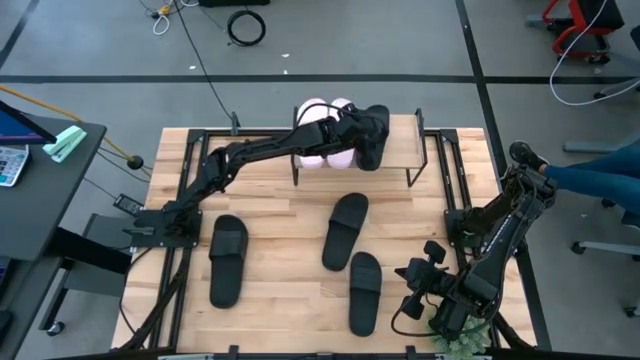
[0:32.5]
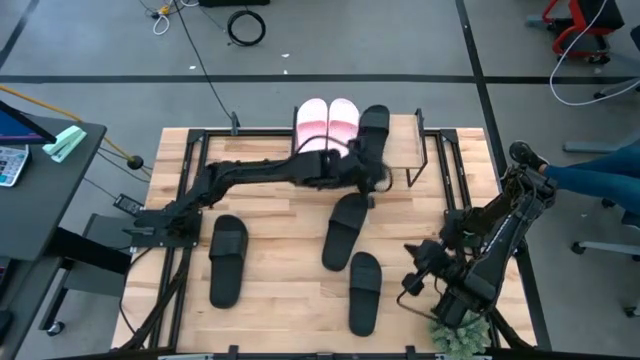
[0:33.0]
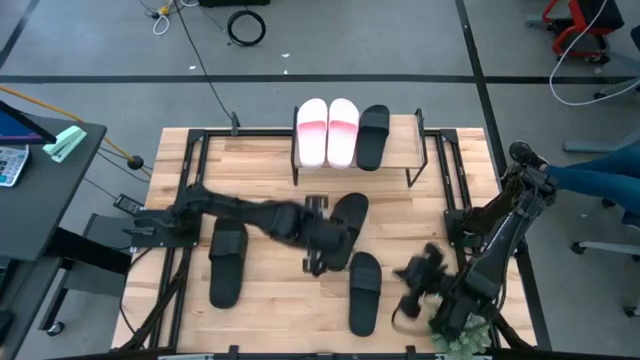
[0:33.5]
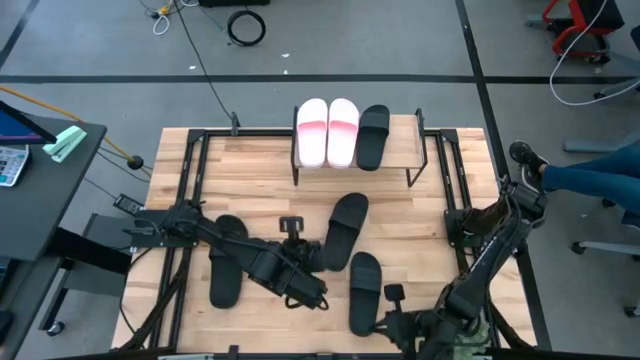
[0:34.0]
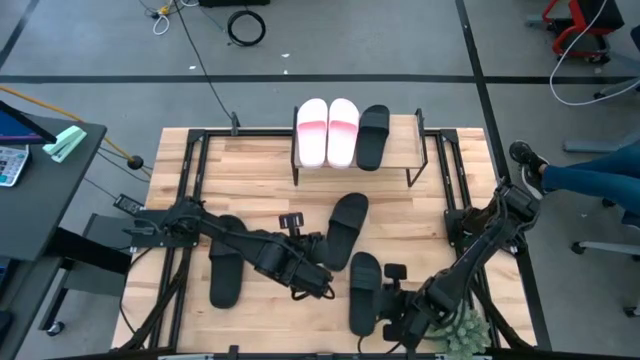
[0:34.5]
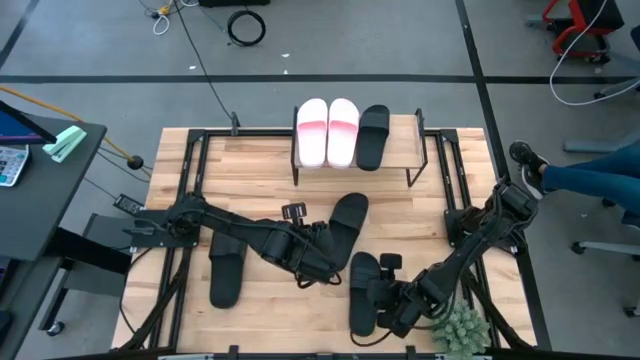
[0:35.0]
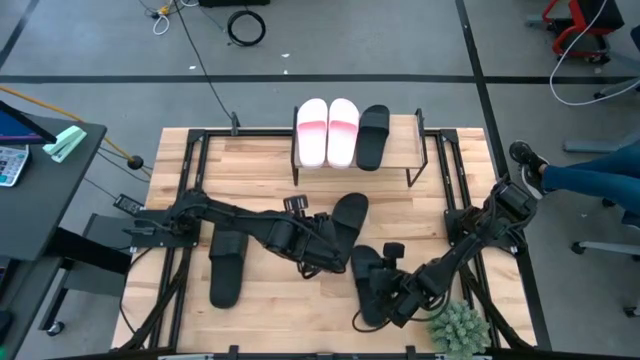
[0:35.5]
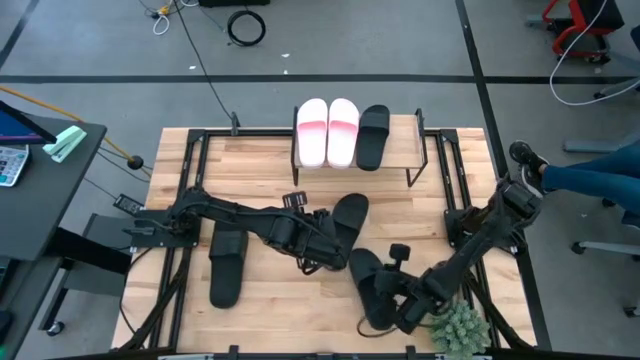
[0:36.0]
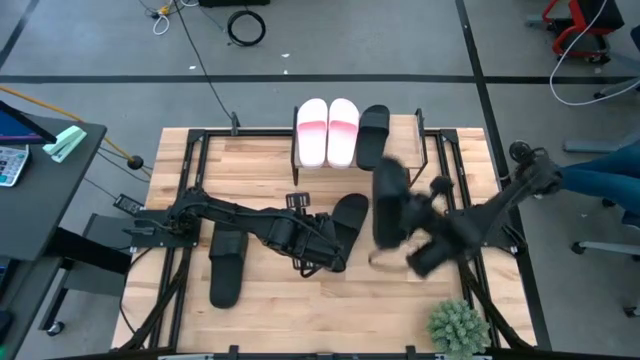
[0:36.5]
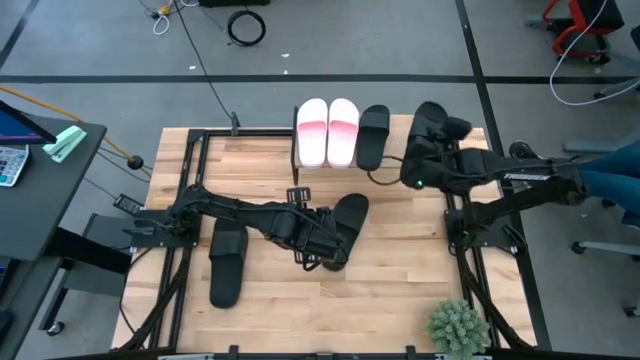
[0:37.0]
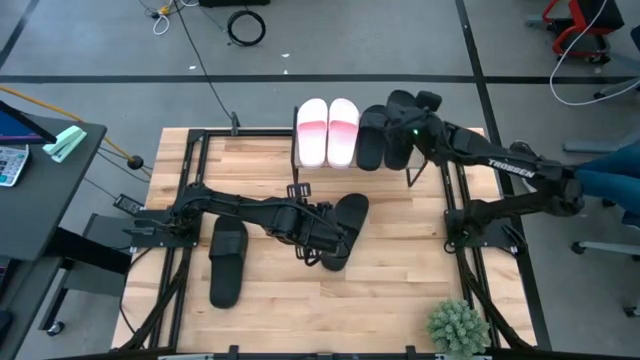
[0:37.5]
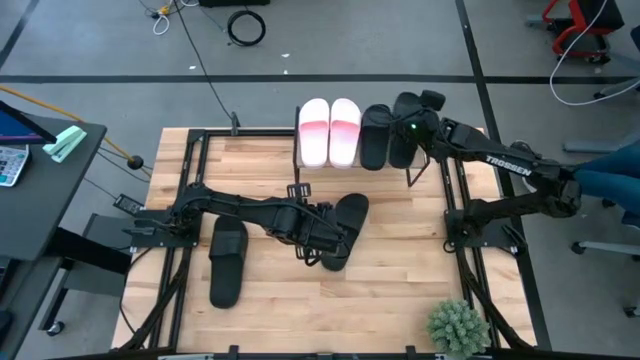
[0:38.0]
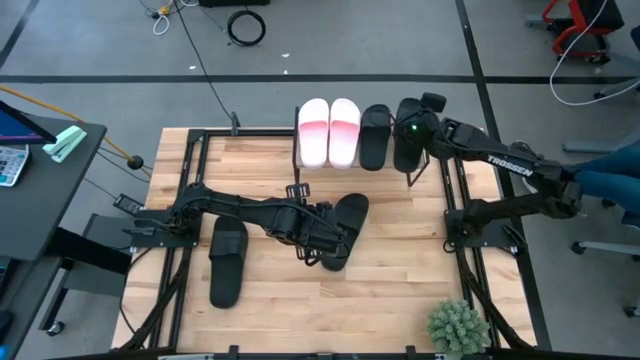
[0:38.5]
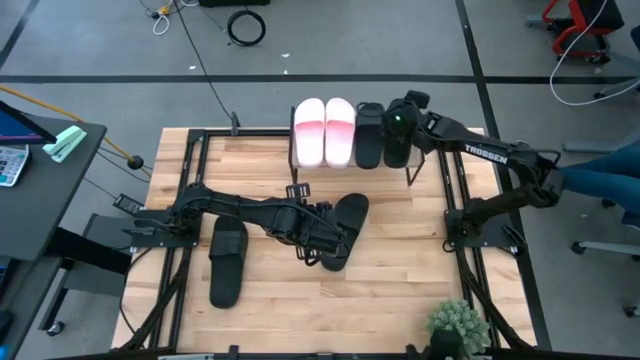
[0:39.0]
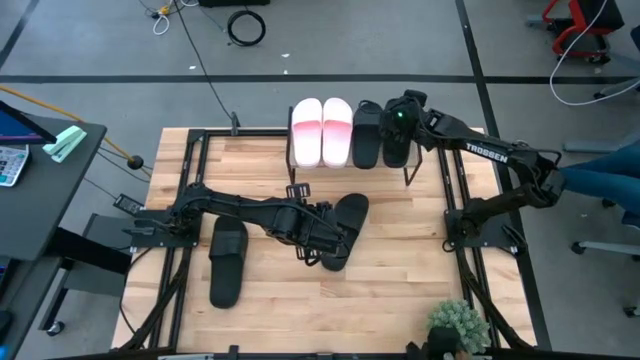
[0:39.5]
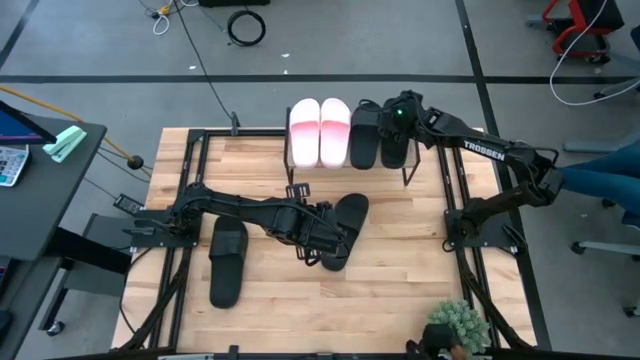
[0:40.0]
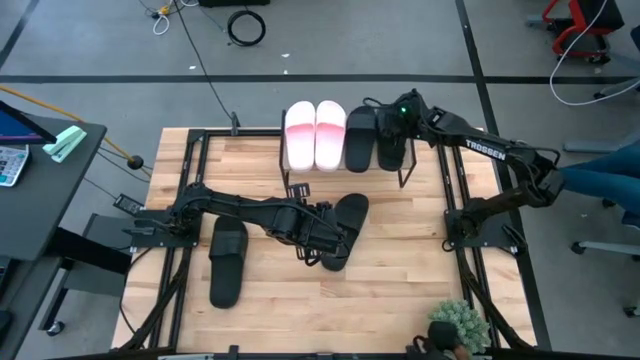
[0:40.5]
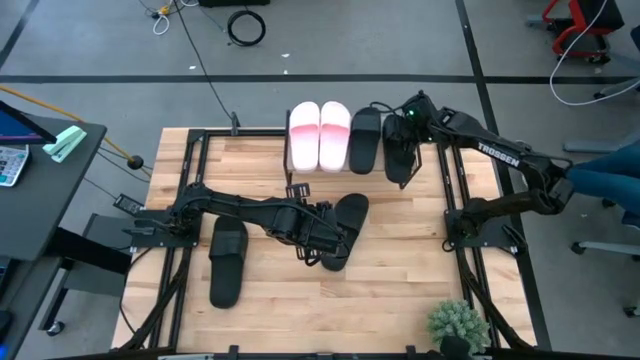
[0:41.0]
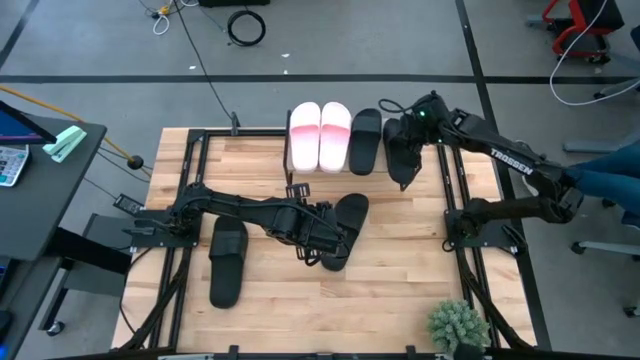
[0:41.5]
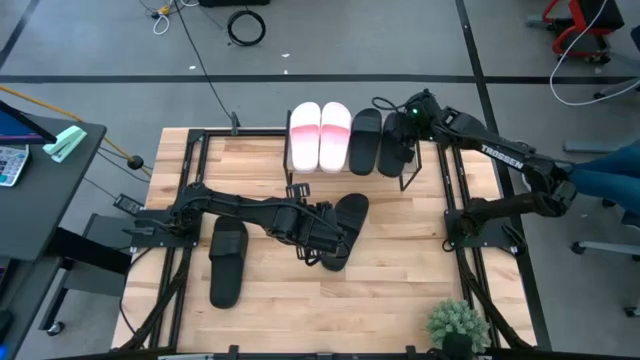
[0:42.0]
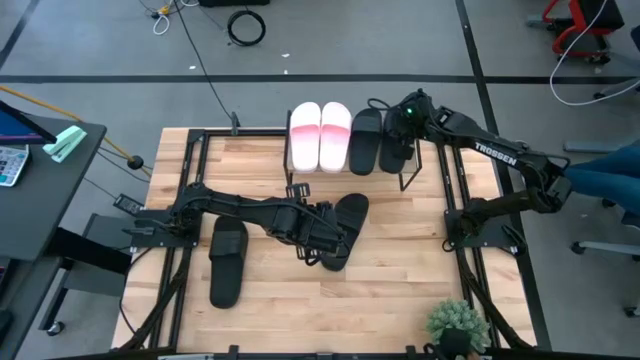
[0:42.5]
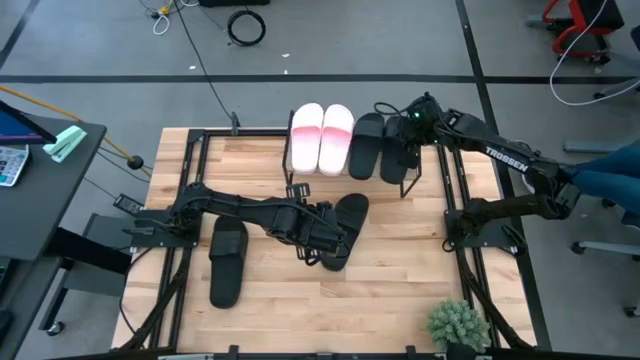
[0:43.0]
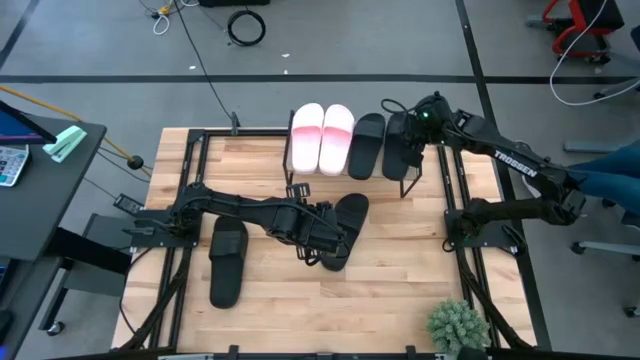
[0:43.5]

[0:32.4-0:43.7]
Task: Pick and place slides into the shelf
Put the bottom right black slide under the shelf

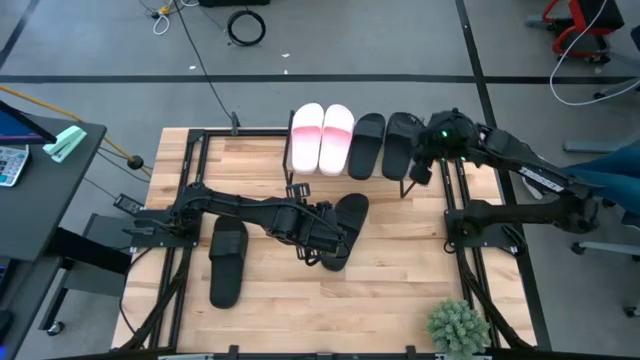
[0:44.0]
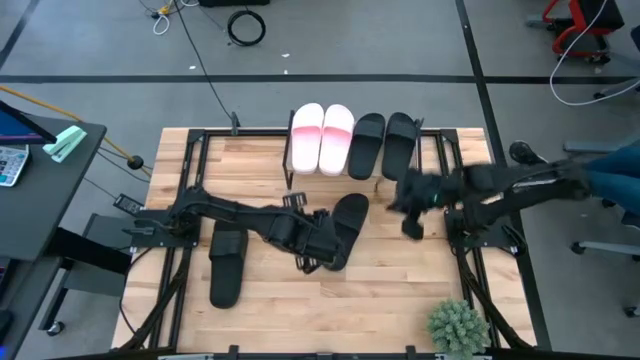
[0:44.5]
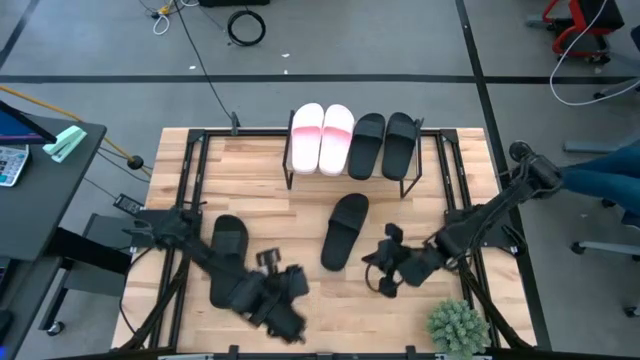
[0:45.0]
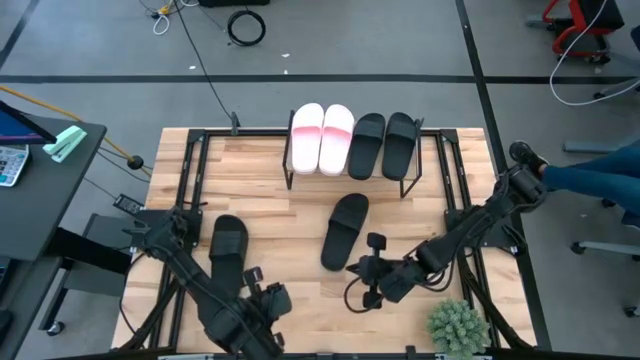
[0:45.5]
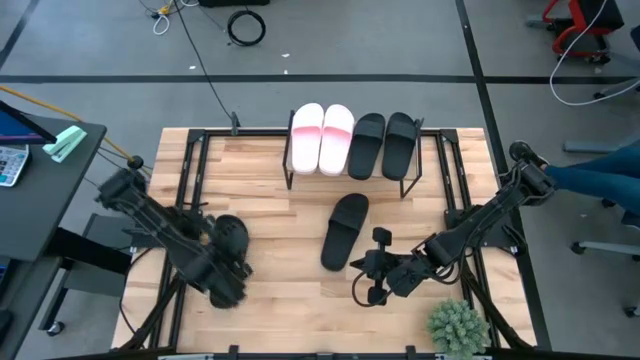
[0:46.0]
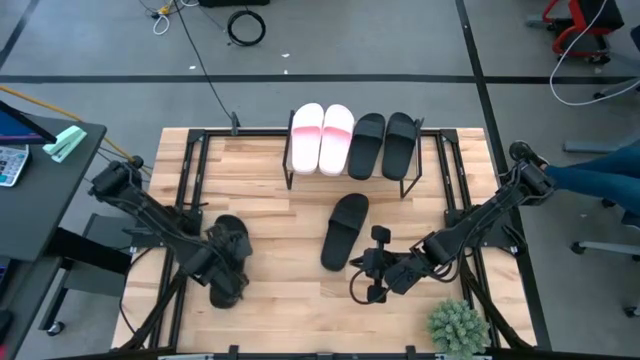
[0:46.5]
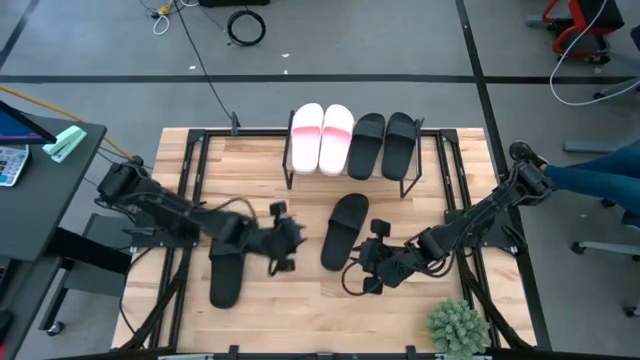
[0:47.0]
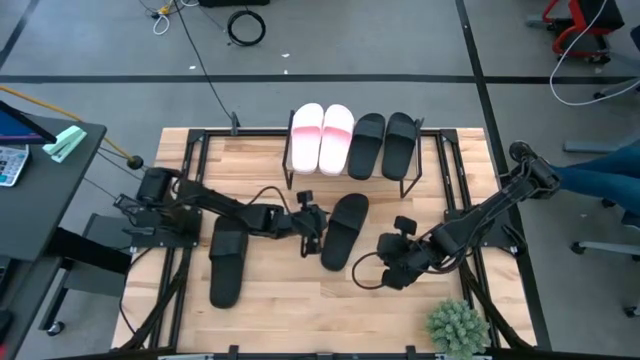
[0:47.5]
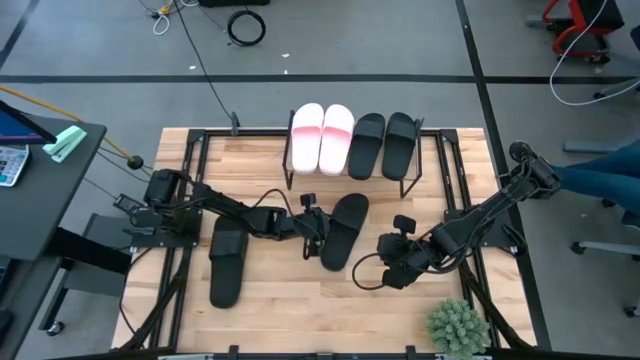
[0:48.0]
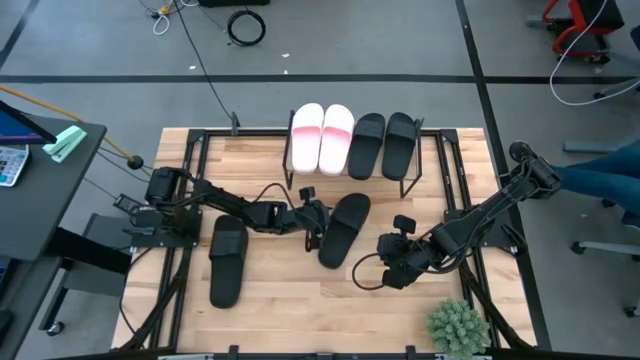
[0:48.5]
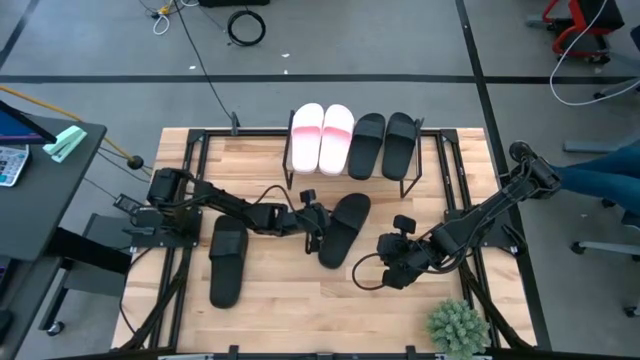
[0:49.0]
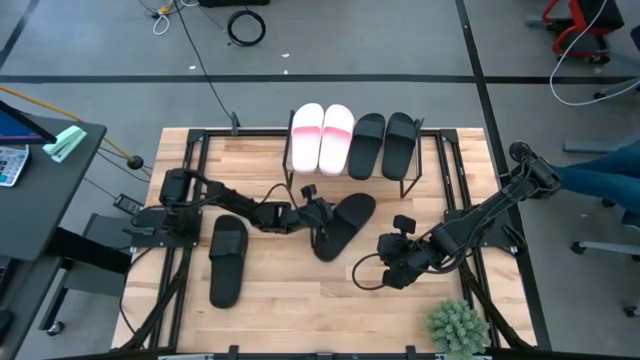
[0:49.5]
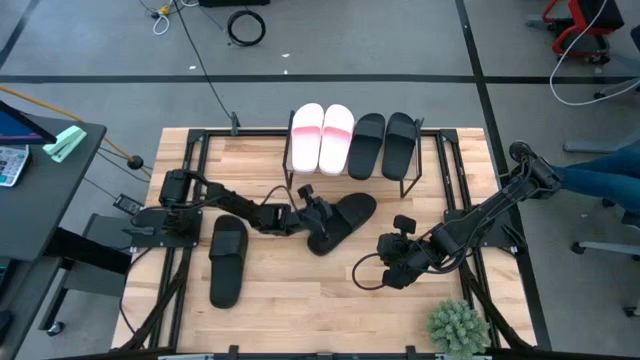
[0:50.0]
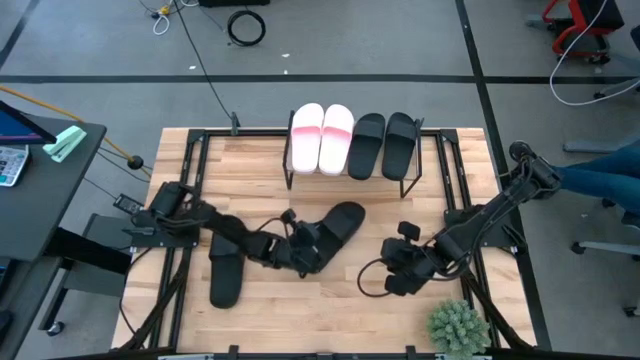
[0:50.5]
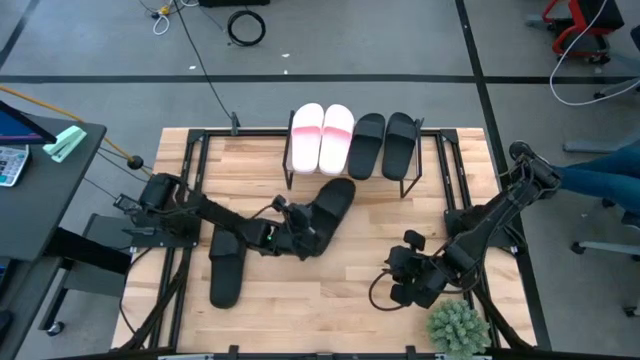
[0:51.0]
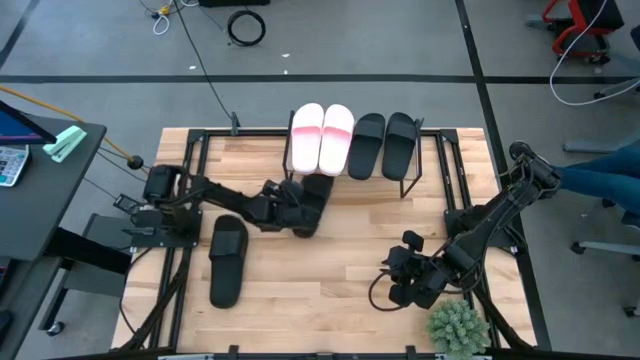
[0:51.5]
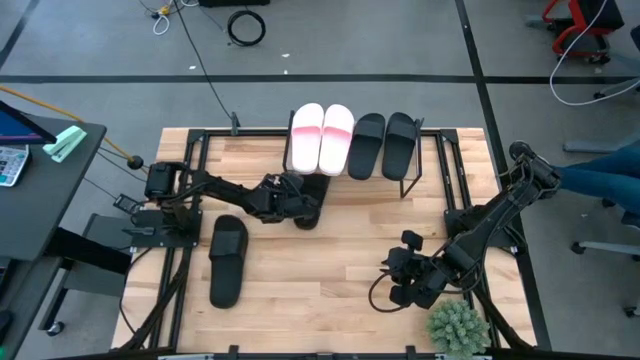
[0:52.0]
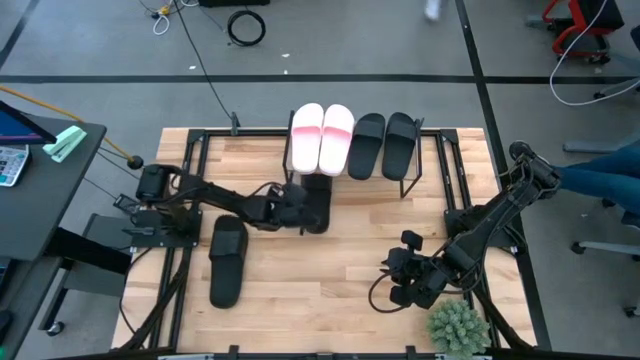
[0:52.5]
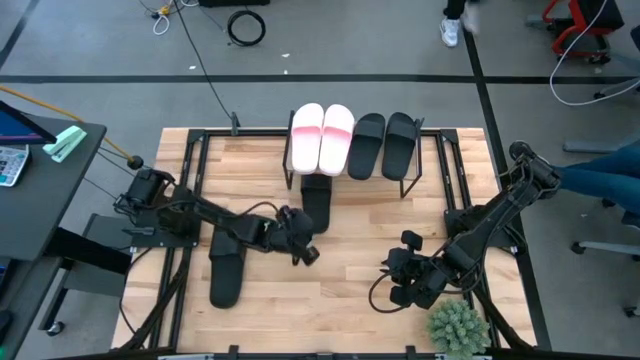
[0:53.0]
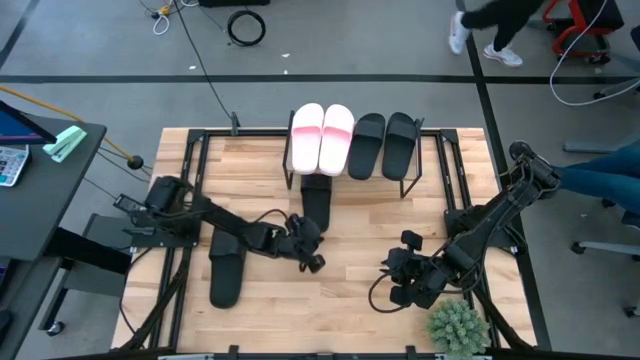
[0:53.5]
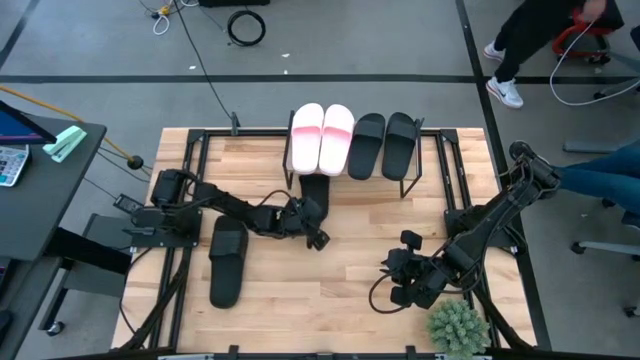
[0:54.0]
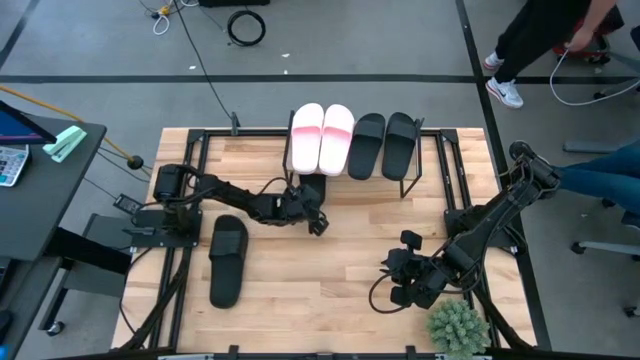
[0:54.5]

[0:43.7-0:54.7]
Put the right black slide under the shelf
